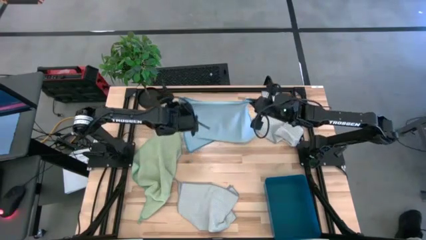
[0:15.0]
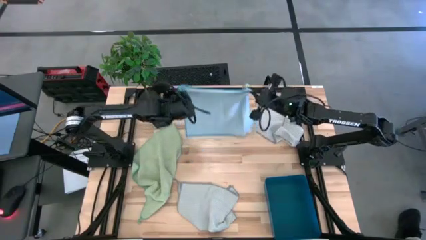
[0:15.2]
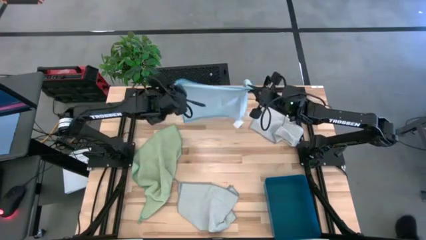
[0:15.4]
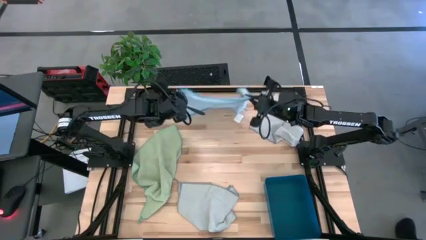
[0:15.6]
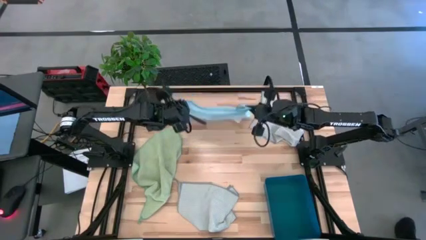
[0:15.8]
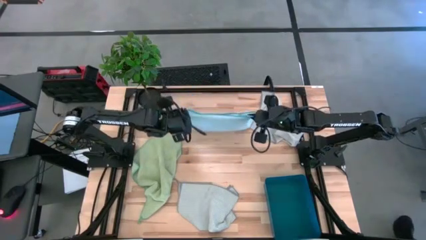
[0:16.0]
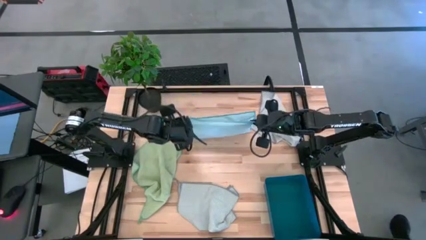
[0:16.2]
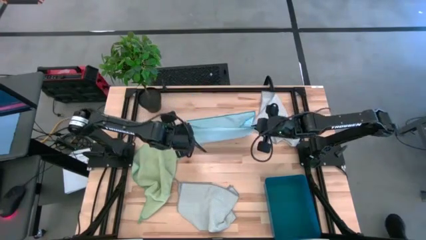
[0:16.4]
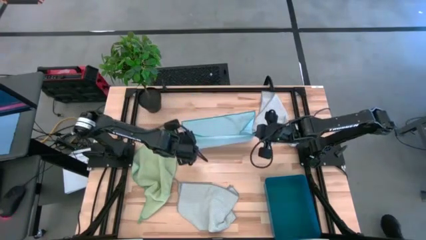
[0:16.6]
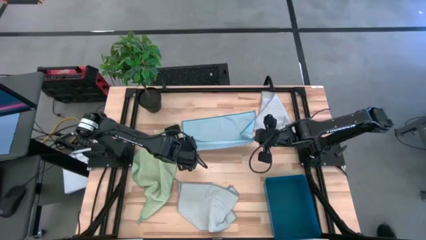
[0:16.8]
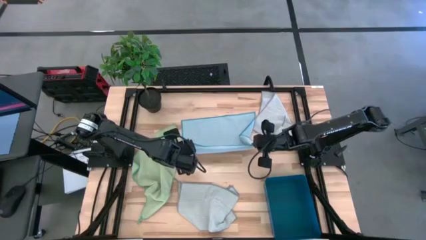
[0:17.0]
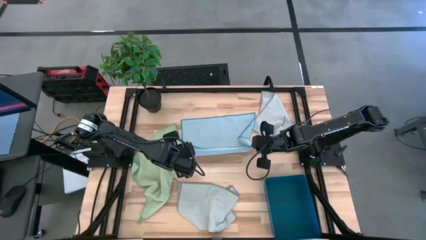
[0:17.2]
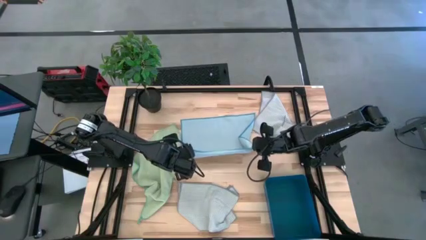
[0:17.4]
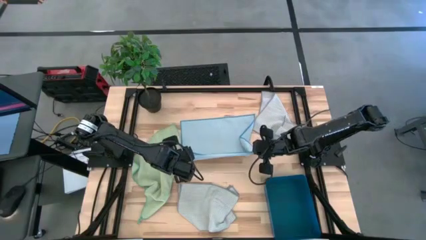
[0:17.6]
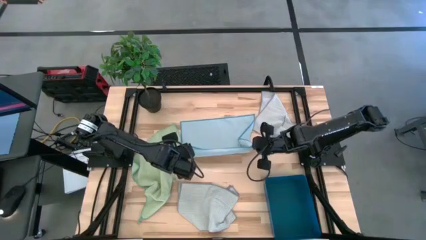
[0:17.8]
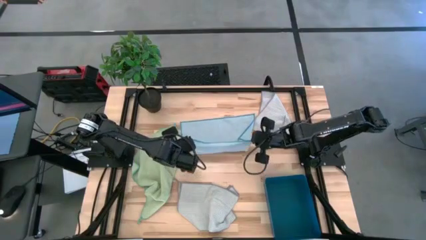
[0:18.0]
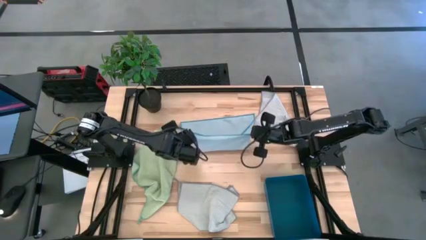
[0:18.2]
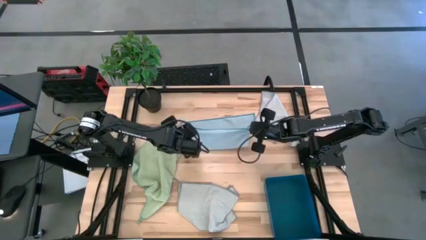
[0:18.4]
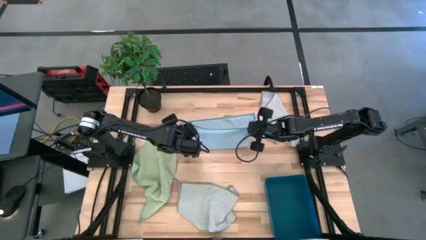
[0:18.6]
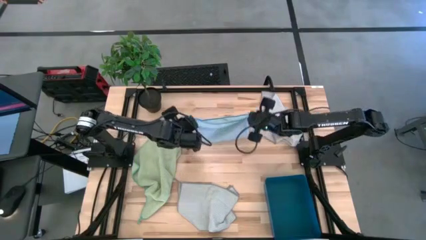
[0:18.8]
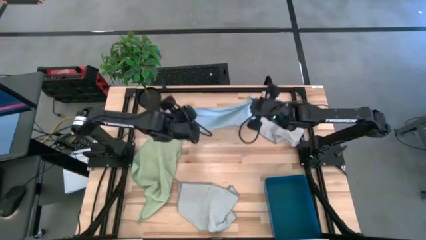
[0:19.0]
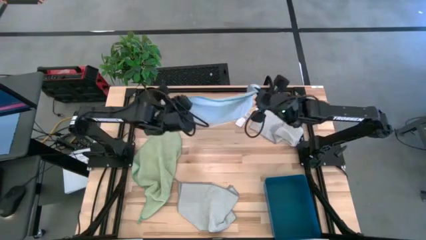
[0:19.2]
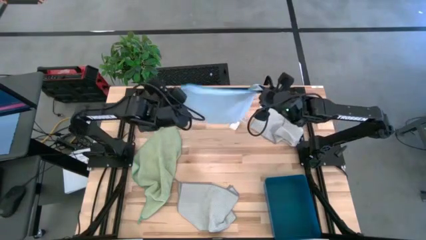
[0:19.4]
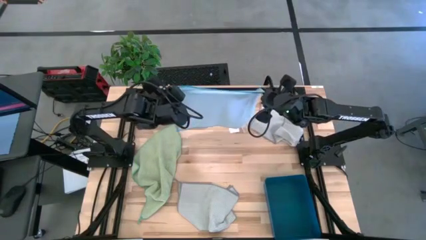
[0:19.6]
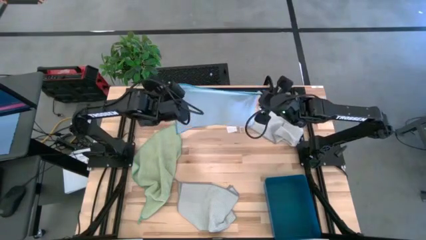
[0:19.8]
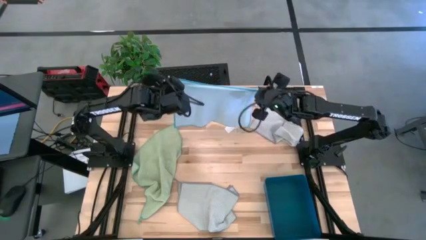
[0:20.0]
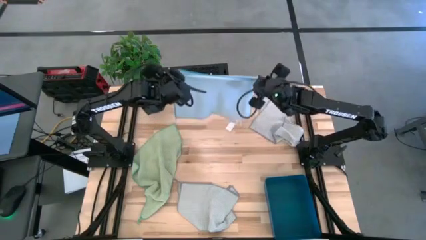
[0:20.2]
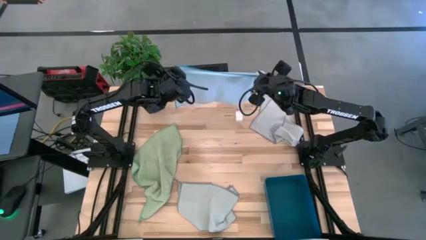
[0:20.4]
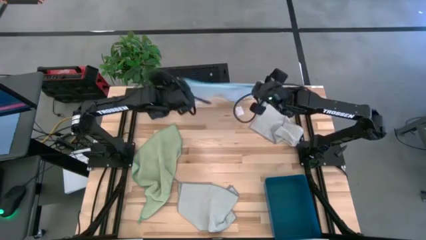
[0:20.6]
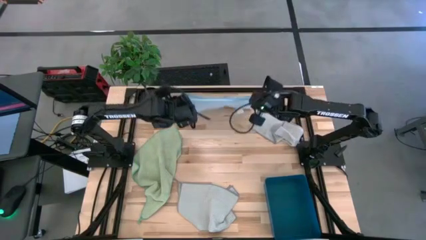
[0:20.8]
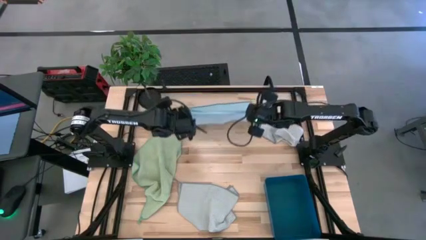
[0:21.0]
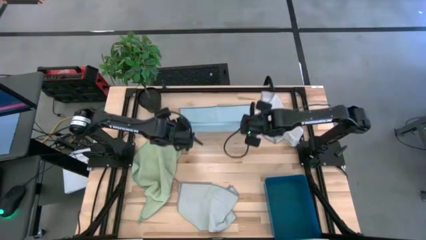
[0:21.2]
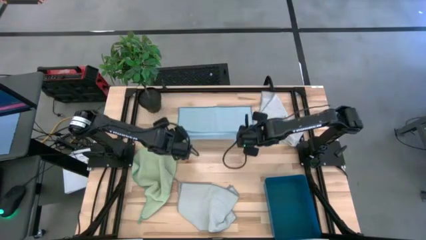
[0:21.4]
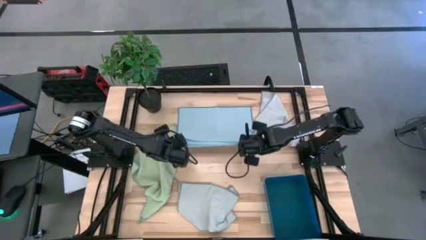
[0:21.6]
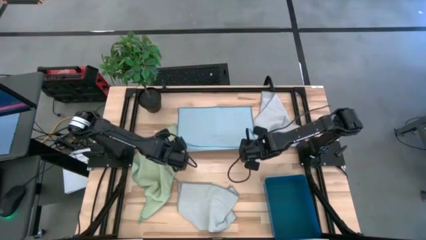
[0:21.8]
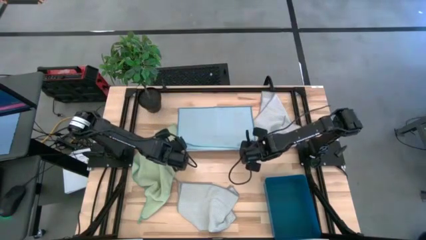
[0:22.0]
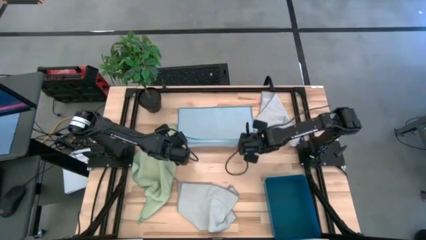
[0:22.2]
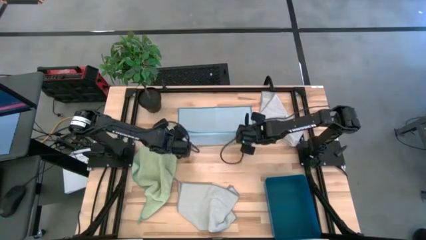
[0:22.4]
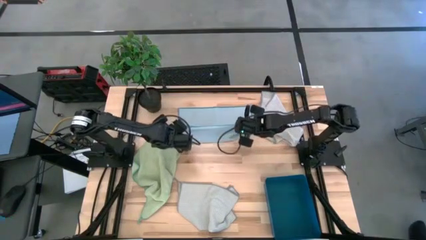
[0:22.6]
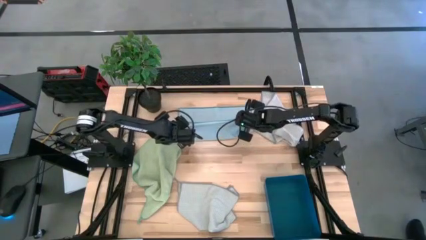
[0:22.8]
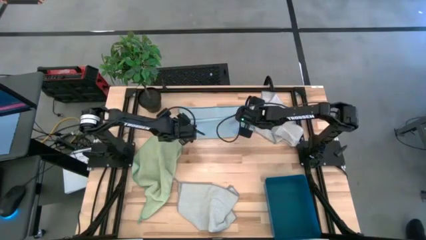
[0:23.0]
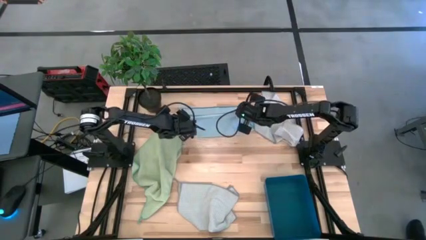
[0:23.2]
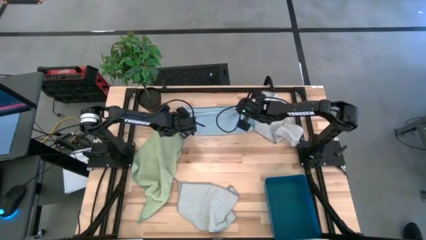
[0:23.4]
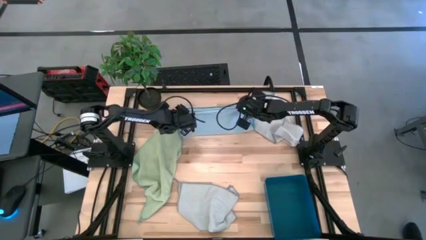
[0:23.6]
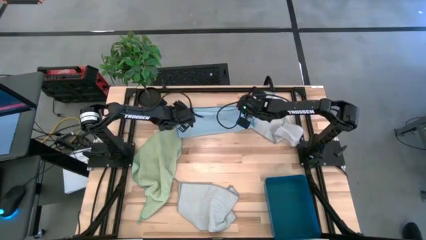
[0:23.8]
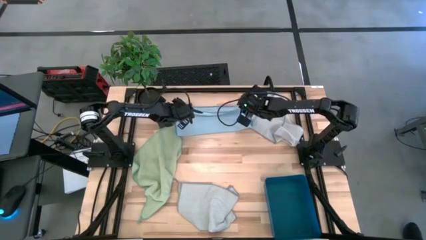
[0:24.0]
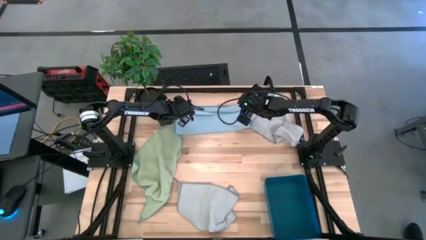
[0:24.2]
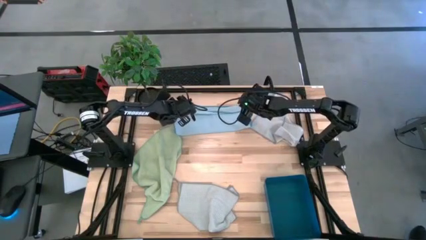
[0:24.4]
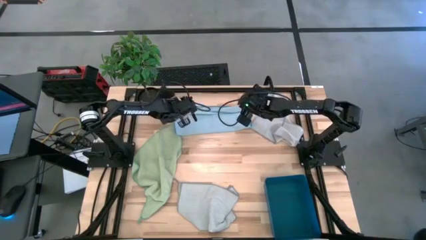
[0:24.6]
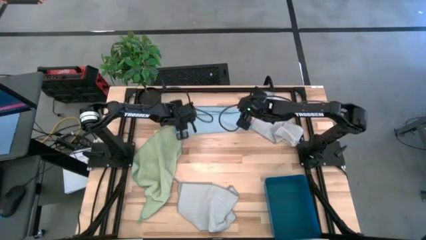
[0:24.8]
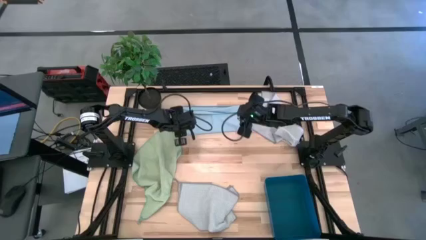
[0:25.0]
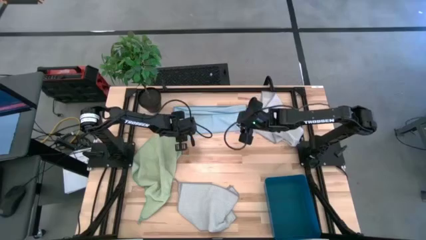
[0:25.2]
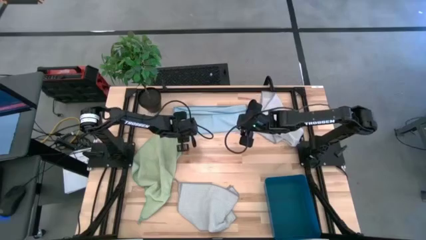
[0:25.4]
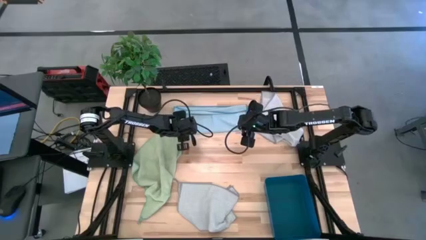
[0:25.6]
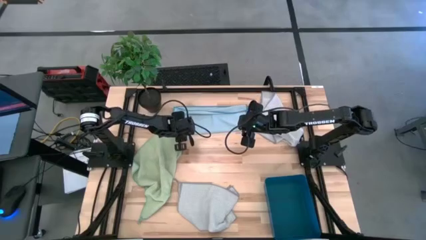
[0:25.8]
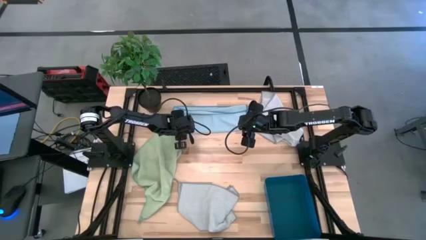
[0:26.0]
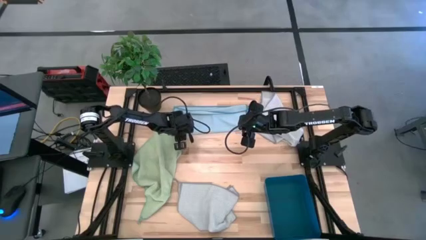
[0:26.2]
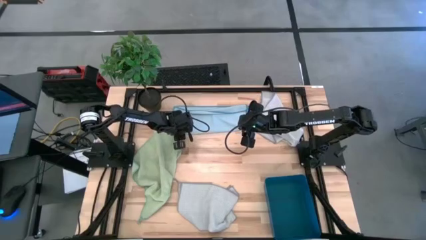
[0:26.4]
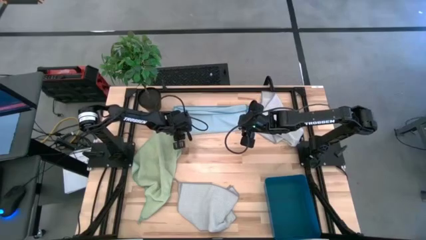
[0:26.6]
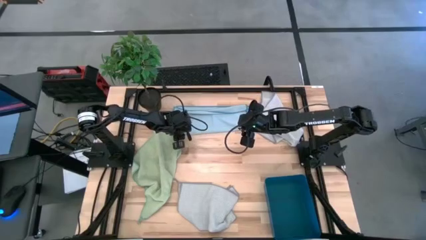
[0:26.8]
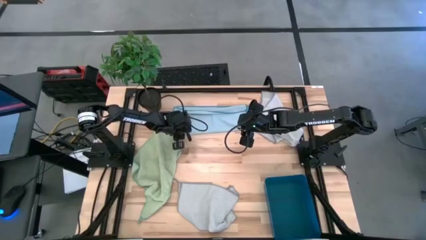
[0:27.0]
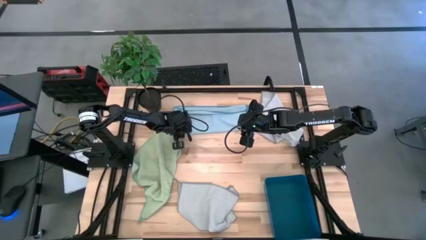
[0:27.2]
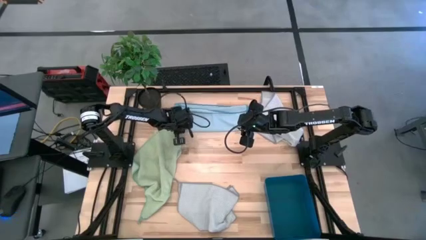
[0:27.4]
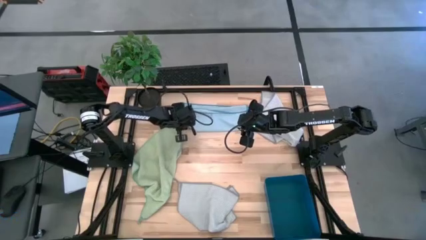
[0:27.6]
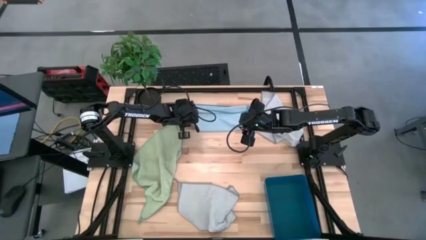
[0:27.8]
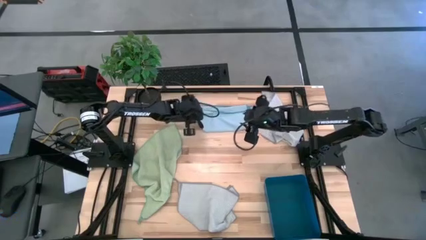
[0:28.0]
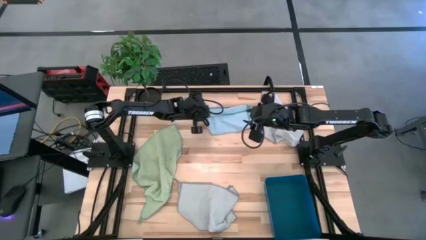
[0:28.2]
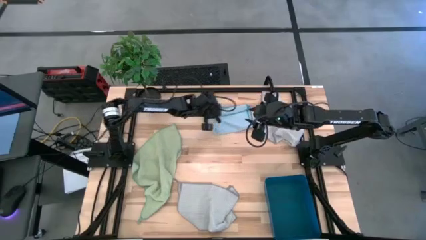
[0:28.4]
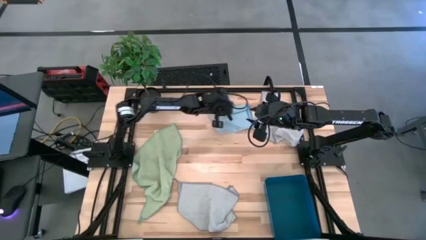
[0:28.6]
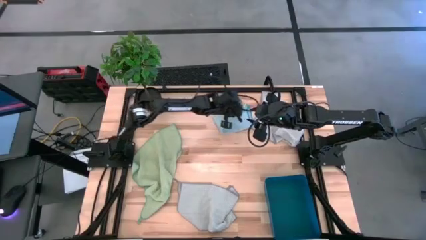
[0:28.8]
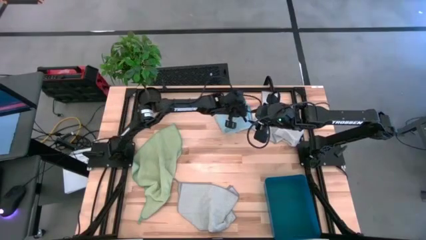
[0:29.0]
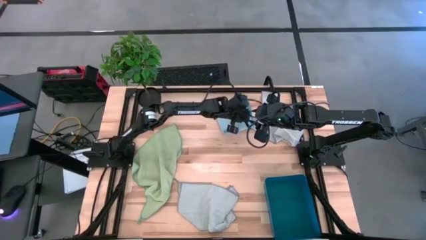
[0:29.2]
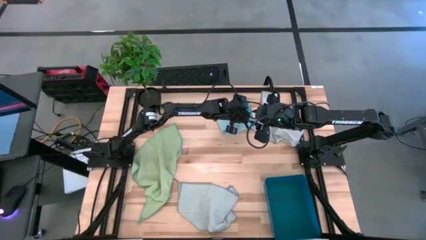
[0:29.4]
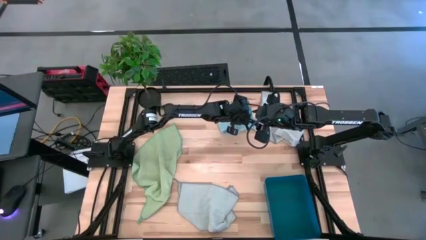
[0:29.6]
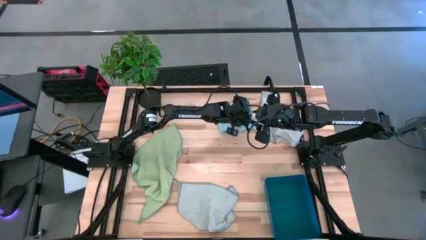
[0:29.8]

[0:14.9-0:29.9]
Task: Fold microfiber towels
Fold the blue microfiber towel
